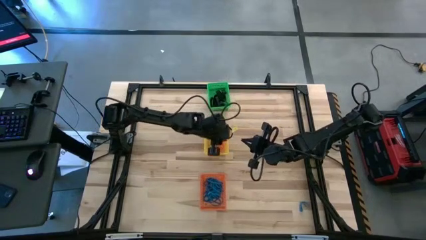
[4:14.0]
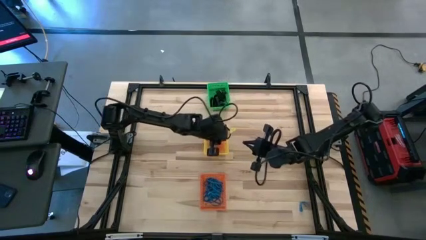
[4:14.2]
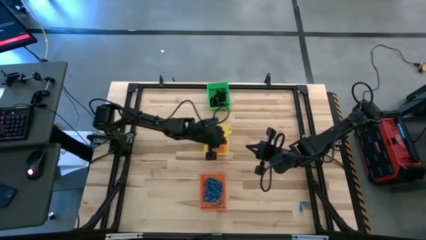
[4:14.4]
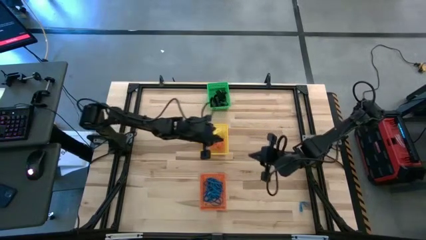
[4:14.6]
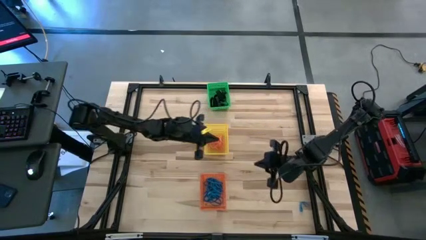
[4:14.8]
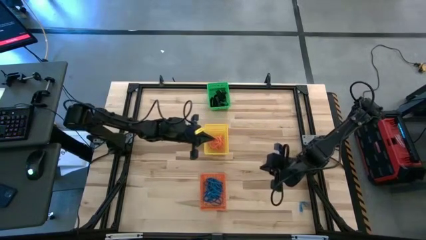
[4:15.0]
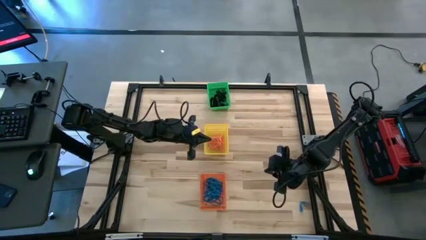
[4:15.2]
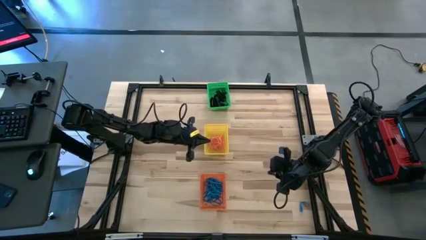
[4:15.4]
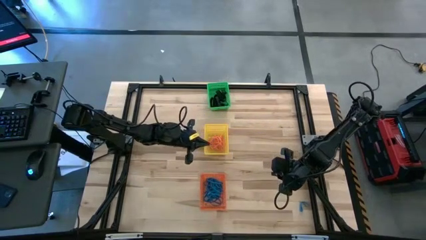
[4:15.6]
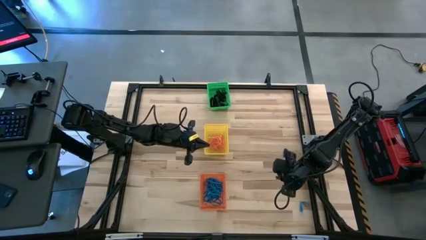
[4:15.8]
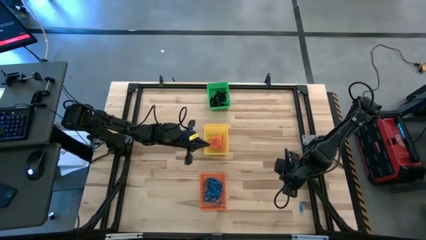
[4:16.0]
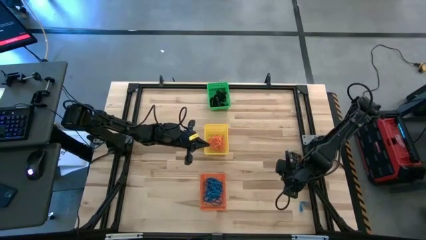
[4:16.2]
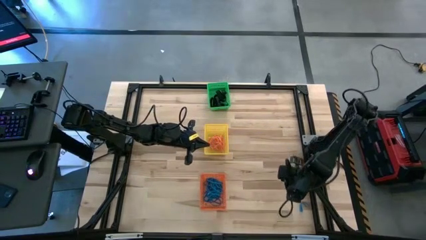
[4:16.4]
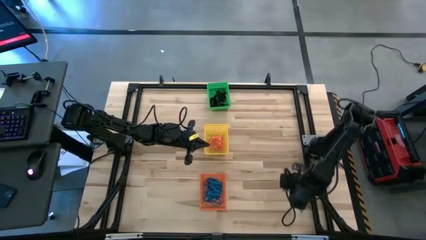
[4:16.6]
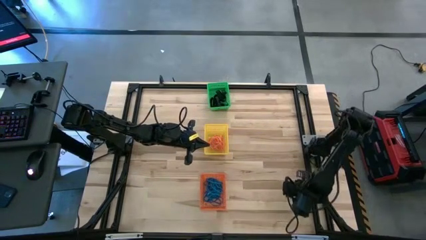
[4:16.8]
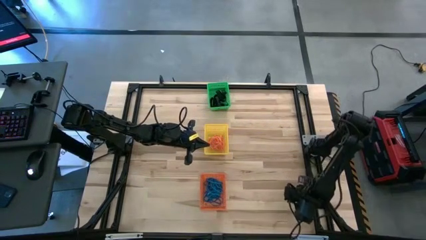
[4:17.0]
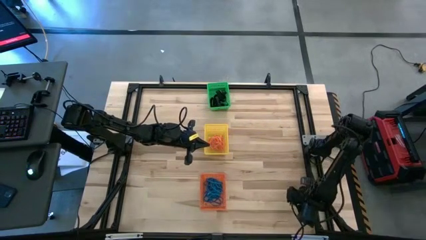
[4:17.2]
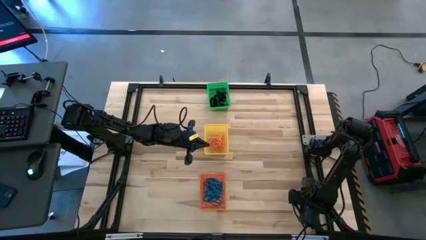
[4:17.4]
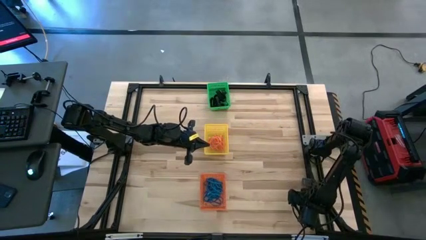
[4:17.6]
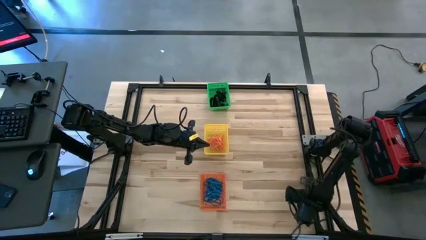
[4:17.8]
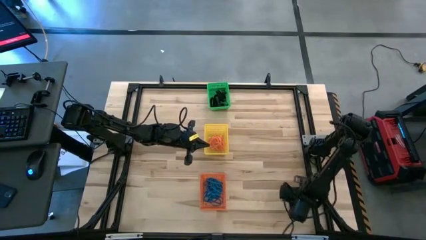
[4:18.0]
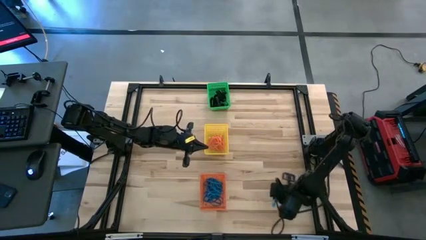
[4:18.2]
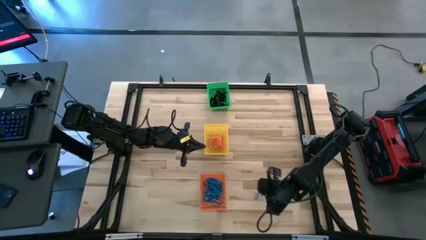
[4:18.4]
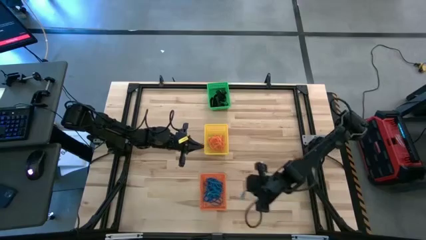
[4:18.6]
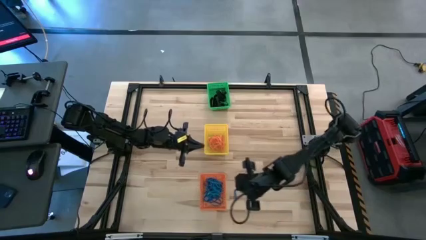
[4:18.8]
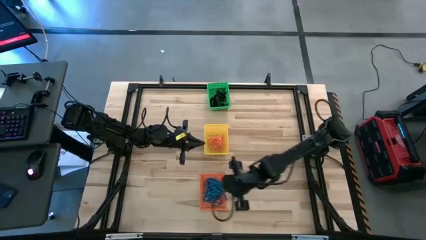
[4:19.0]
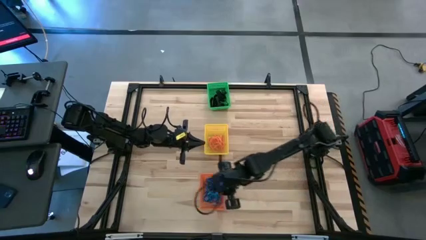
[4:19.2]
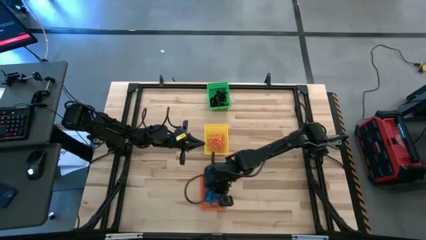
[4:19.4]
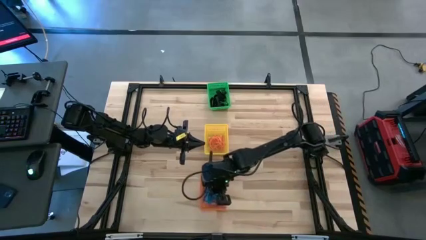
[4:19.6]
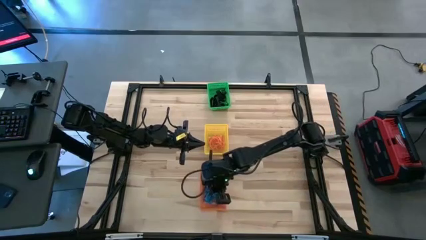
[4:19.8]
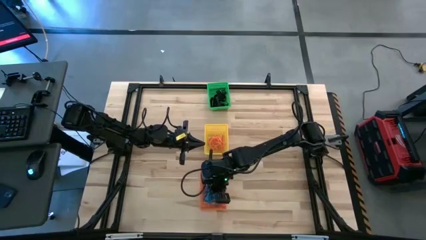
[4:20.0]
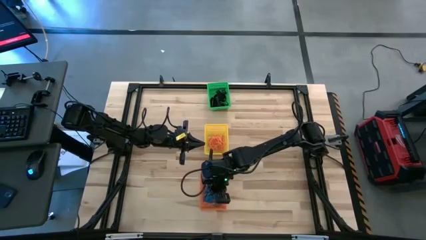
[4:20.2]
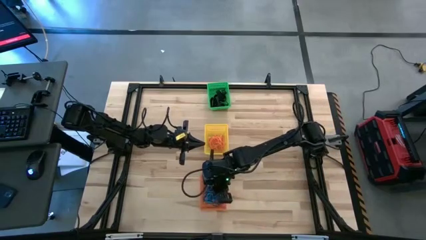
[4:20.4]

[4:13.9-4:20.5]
Task: Sort rubber bands into baskets
Put the orange rubber band into the yellow bin

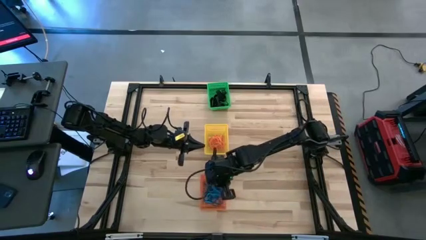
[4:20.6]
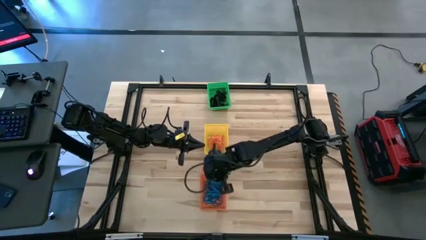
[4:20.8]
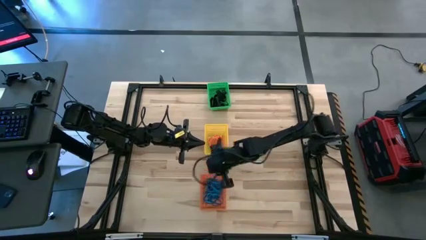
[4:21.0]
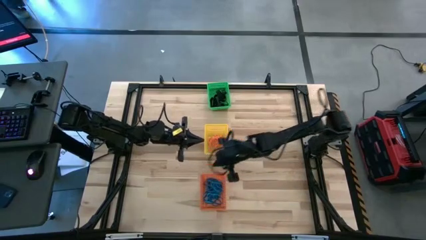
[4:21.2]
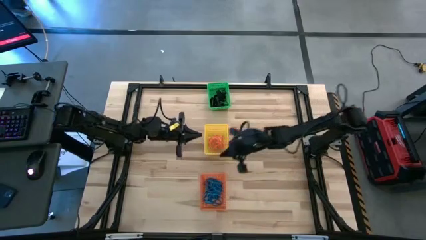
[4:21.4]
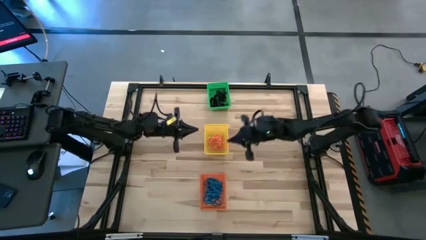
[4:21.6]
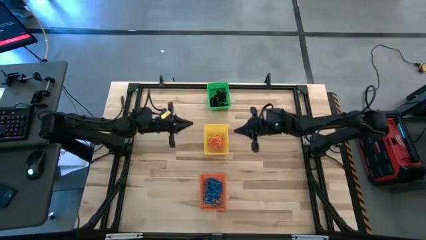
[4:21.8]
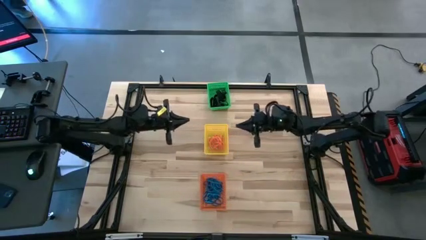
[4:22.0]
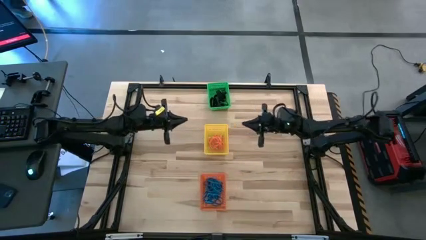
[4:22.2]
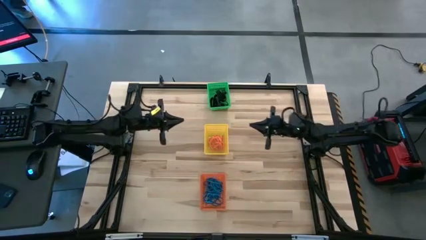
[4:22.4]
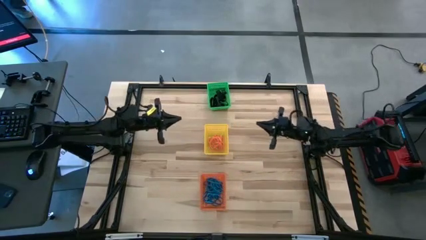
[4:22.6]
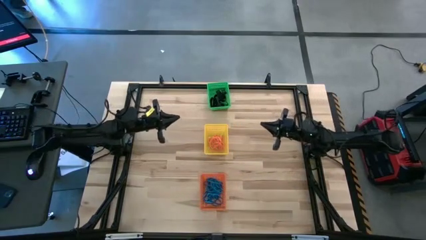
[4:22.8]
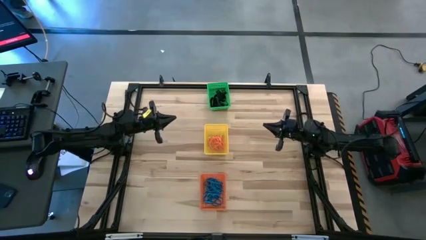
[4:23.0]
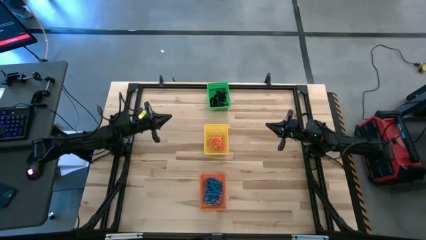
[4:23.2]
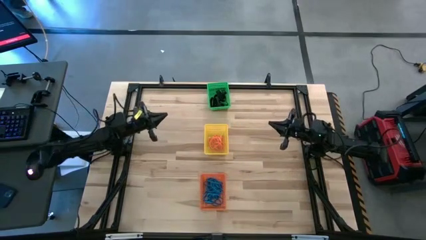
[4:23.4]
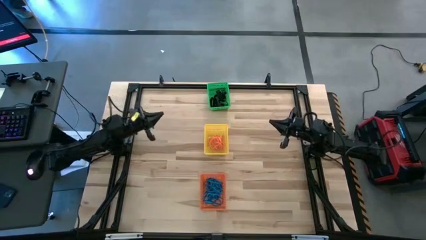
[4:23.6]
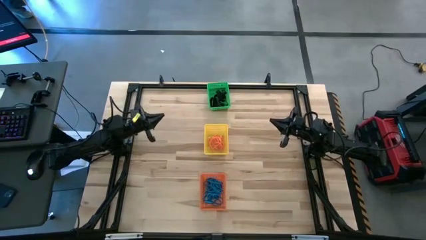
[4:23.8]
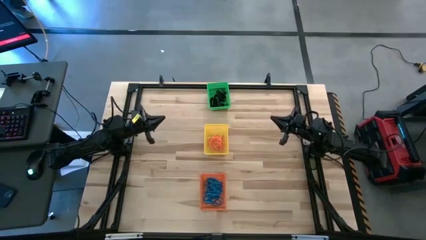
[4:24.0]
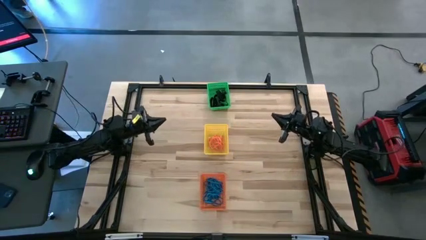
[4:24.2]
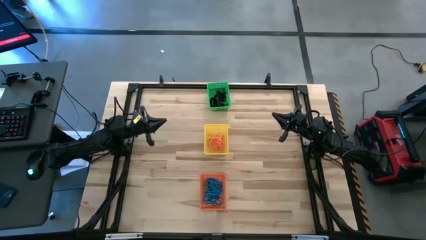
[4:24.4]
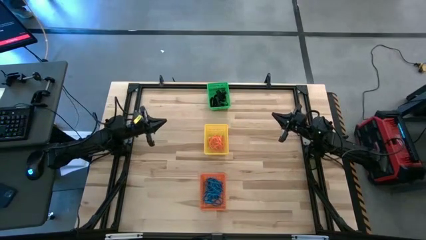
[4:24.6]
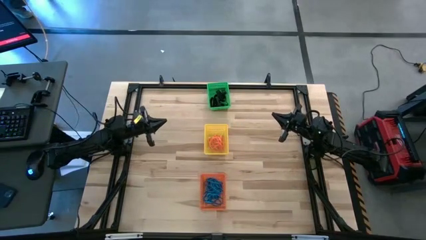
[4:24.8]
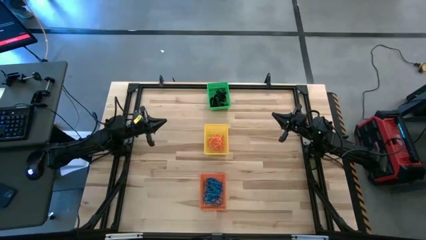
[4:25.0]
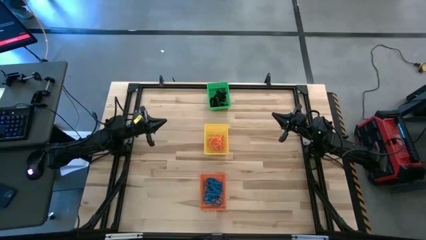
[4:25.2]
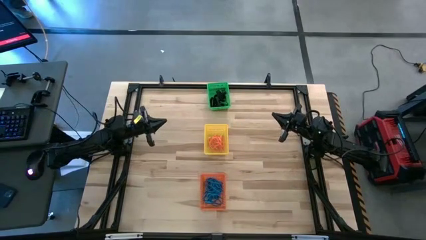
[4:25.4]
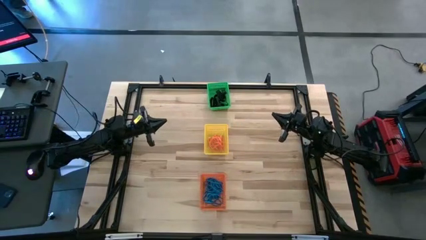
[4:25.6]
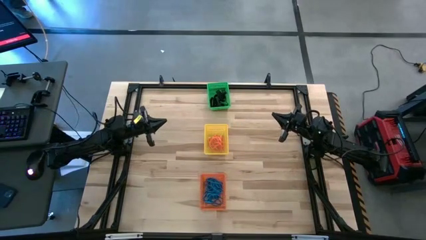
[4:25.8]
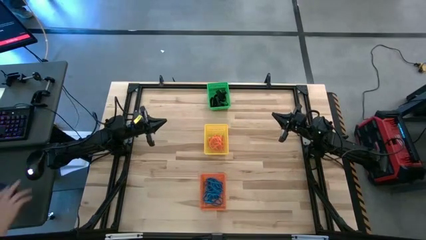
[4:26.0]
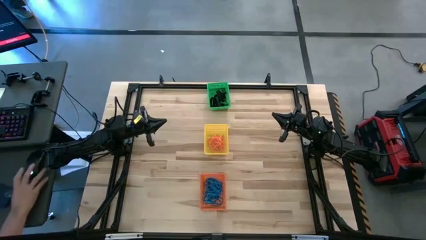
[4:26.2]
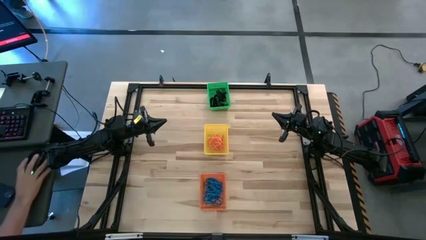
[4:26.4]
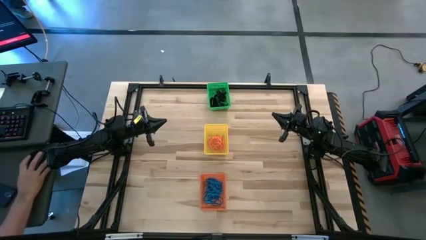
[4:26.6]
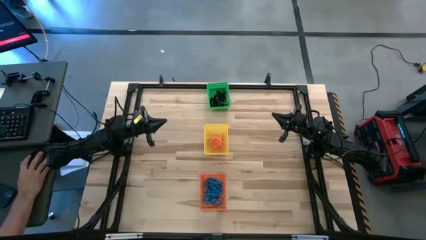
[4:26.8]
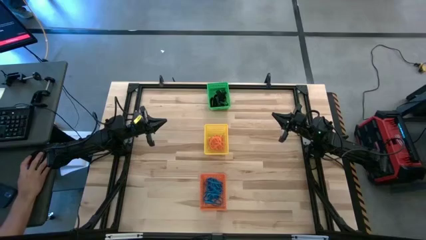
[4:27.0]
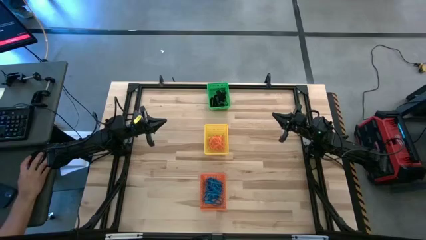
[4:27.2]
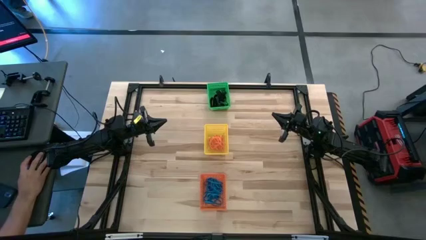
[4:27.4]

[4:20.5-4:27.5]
Return to Home Position

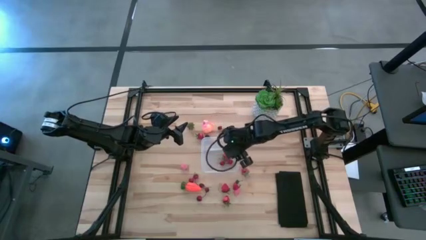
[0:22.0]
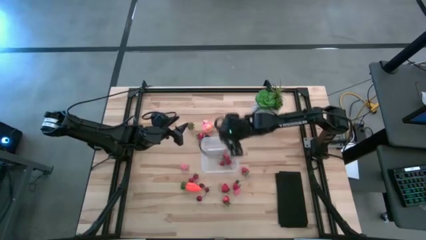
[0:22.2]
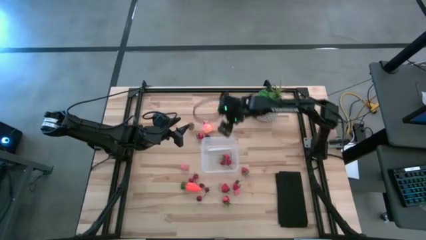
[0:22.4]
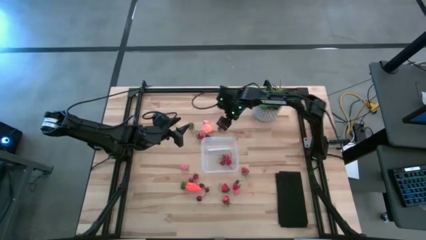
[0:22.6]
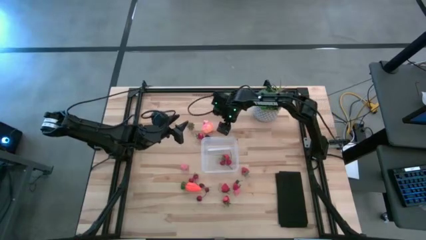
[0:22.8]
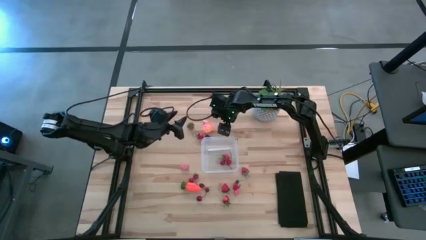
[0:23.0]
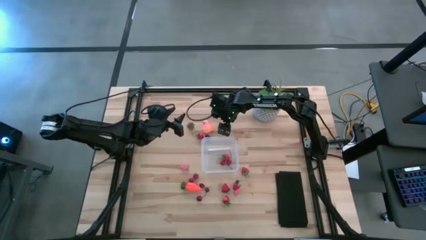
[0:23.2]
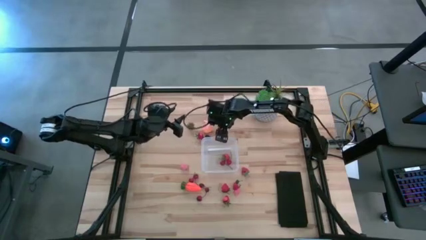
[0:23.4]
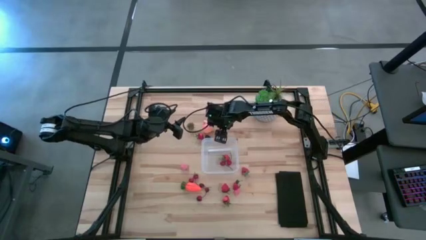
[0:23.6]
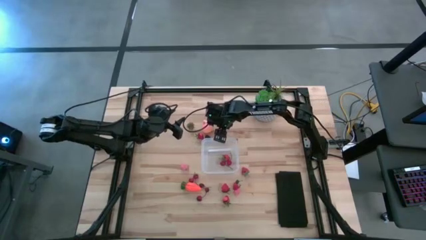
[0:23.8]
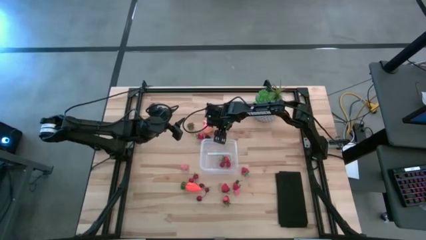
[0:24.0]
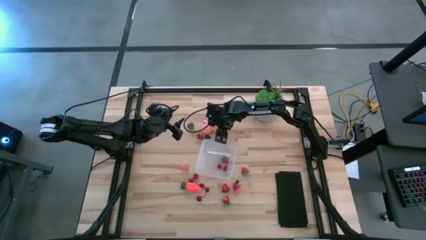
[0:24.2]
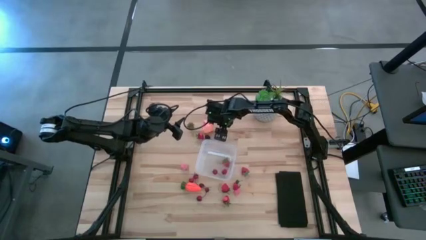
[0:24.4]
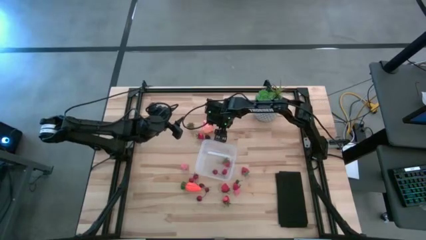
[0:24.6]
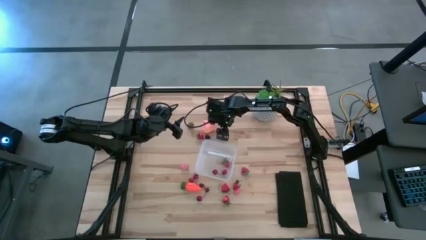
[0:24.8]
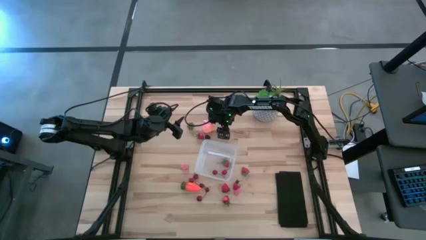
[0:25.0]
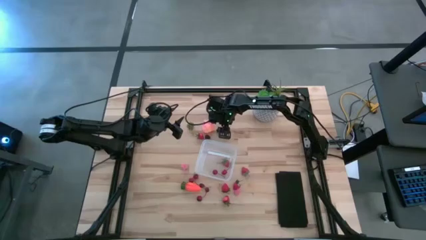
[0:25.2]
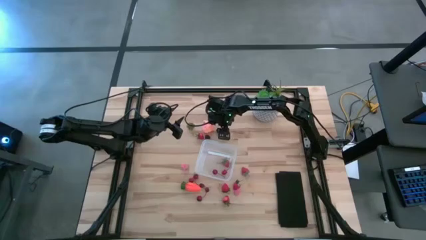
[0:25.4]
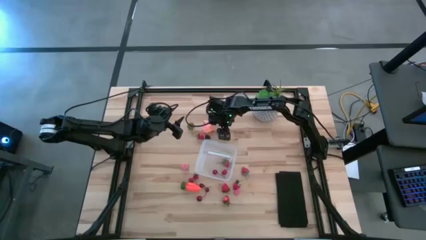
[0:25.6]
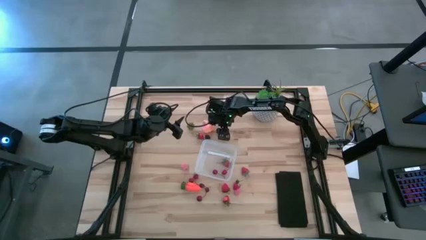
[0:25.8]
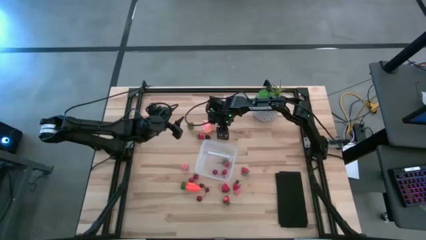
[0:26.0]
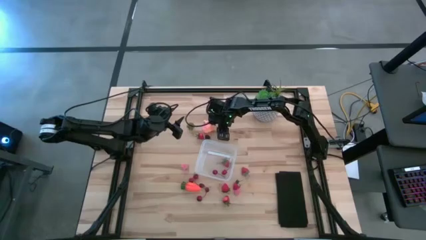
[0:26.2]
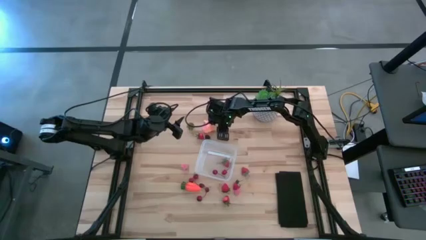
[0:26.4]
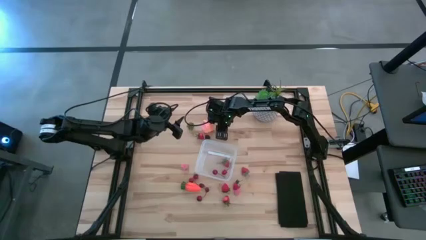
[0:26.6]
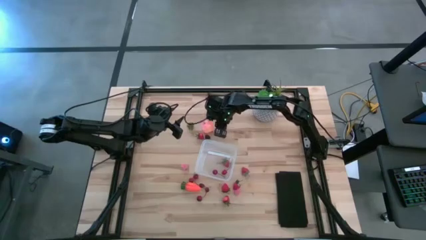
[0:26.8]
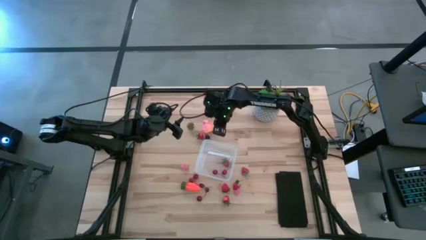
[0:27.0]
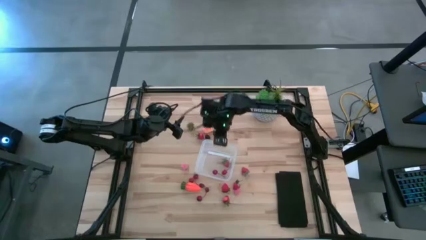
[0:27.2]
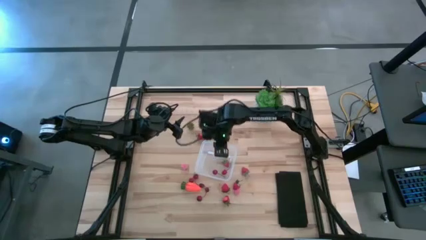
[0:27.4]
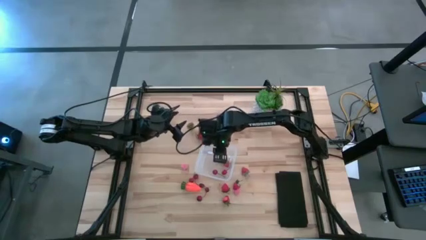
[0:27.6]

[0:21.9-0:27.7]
Task: Pick and placing Produce into tupperware
Put the red cherry into the transparent container
